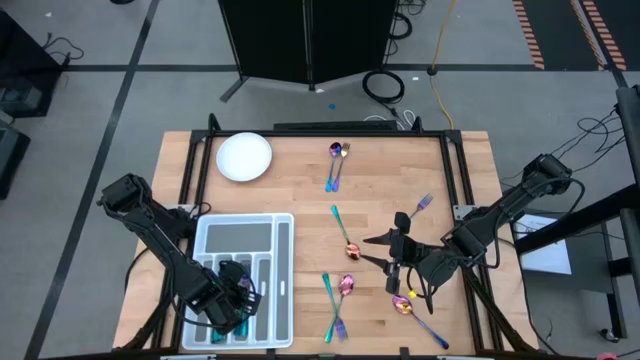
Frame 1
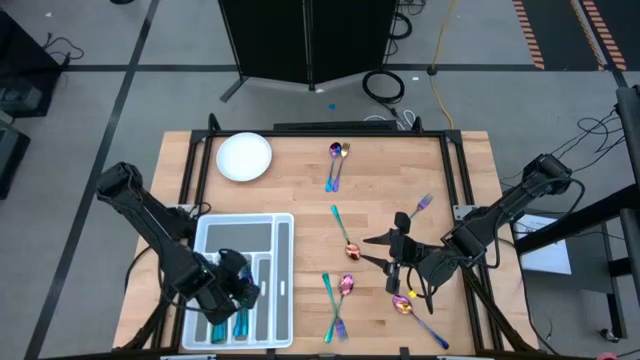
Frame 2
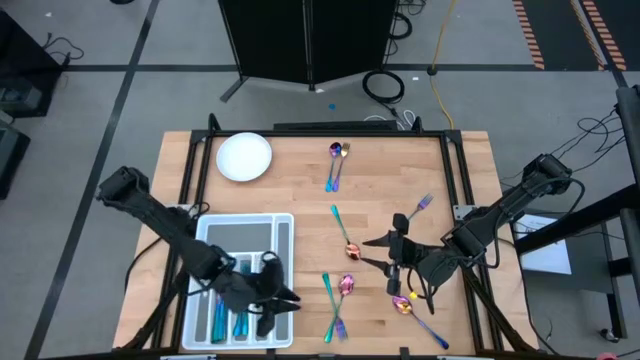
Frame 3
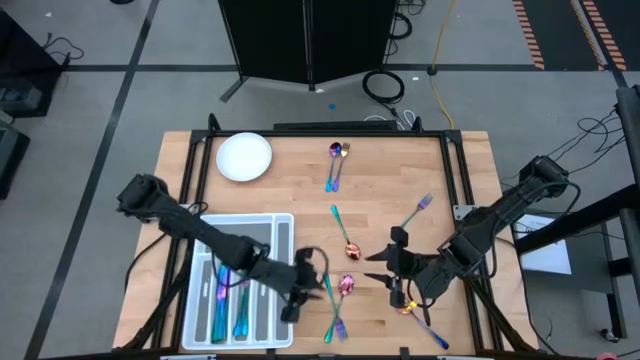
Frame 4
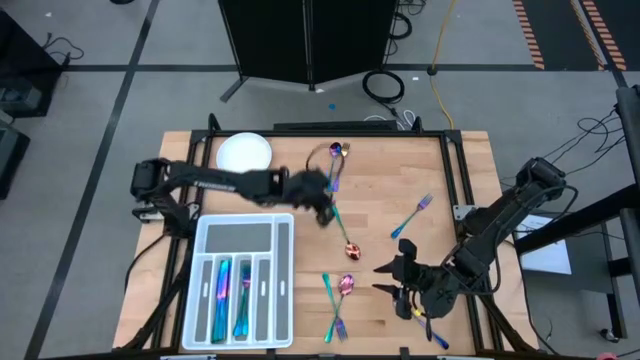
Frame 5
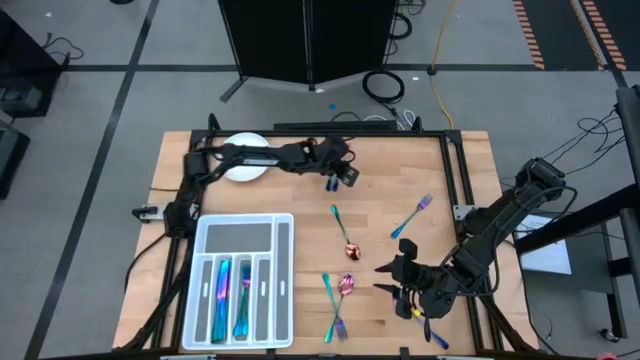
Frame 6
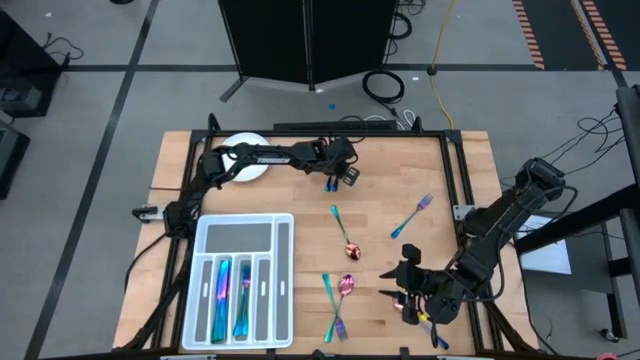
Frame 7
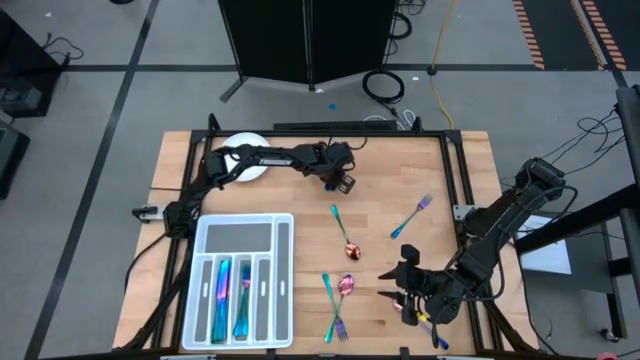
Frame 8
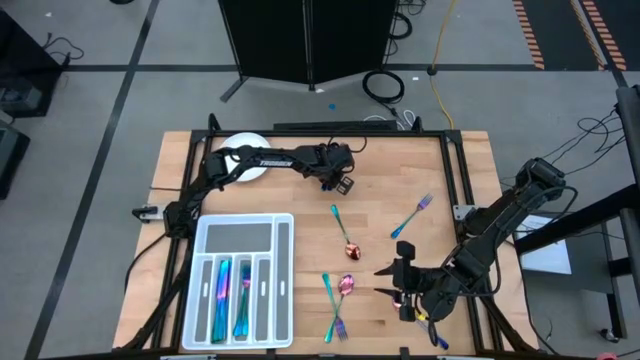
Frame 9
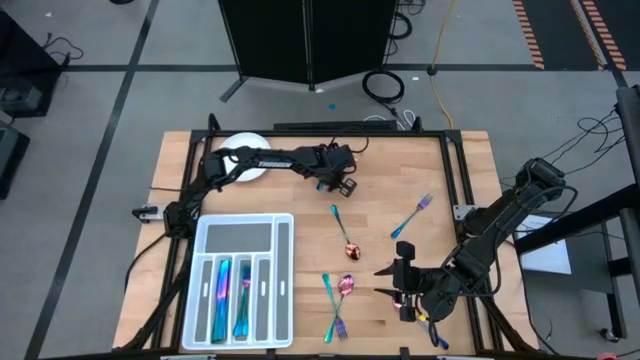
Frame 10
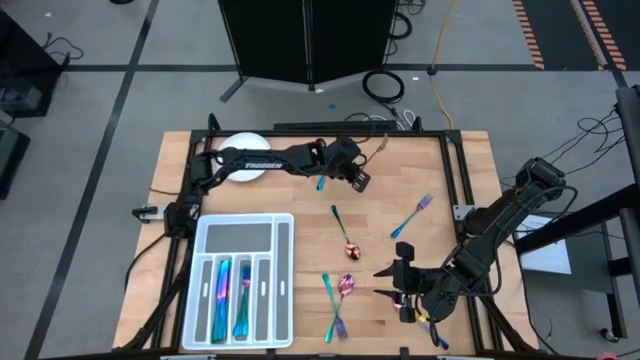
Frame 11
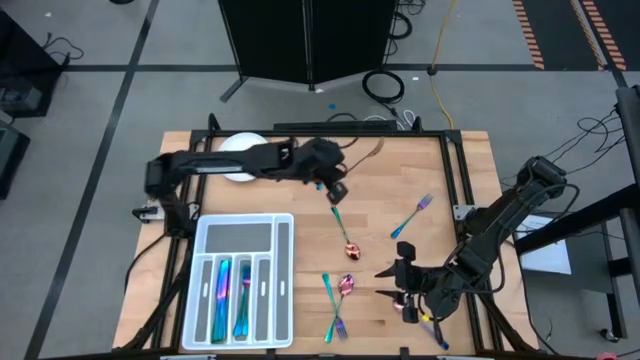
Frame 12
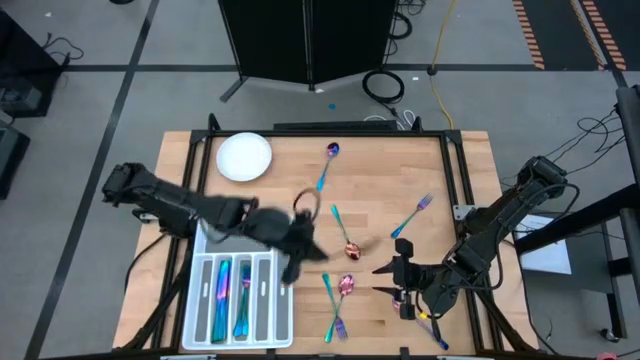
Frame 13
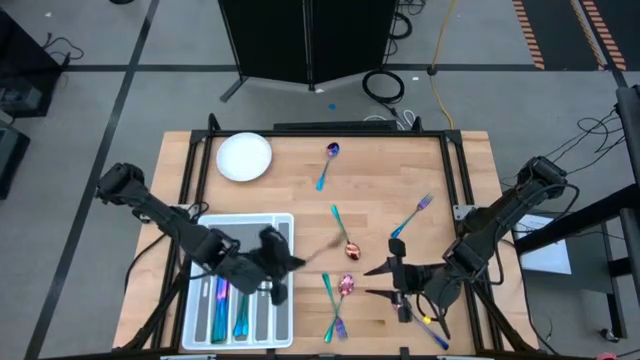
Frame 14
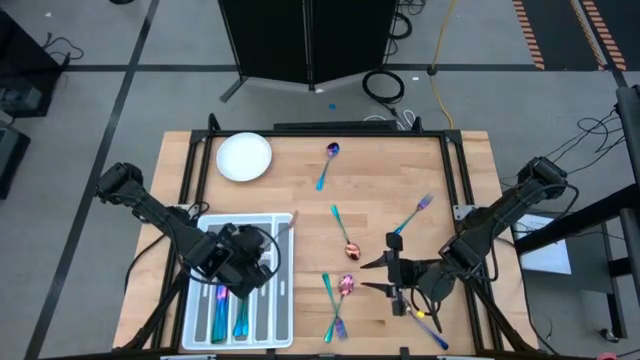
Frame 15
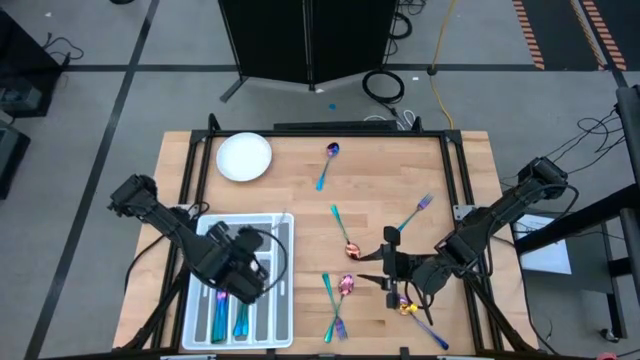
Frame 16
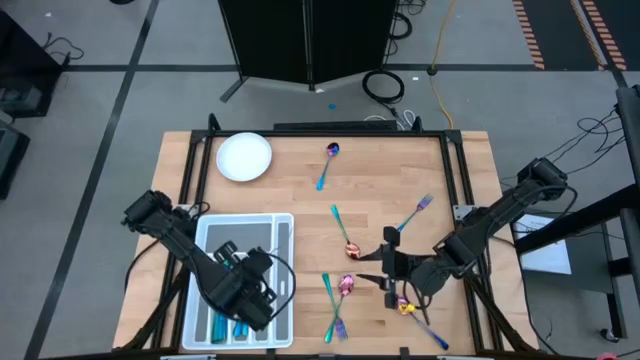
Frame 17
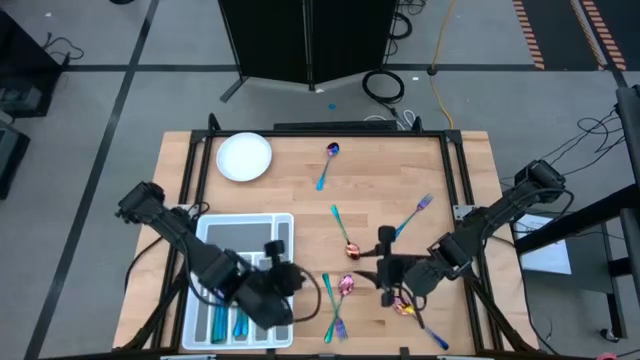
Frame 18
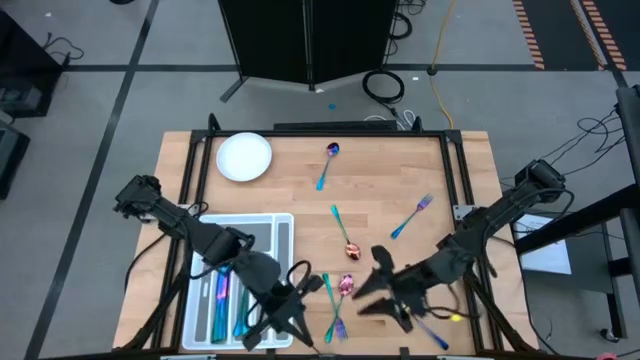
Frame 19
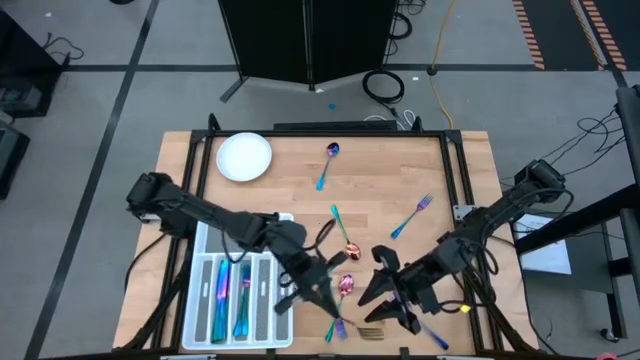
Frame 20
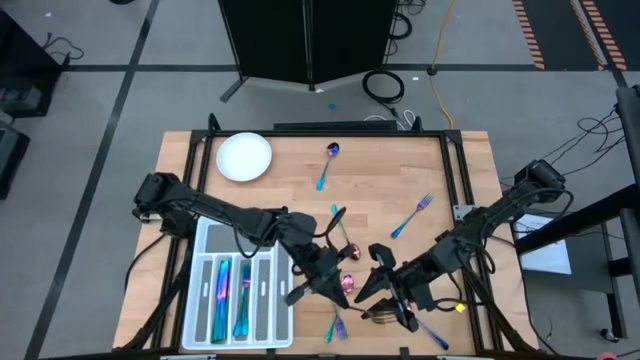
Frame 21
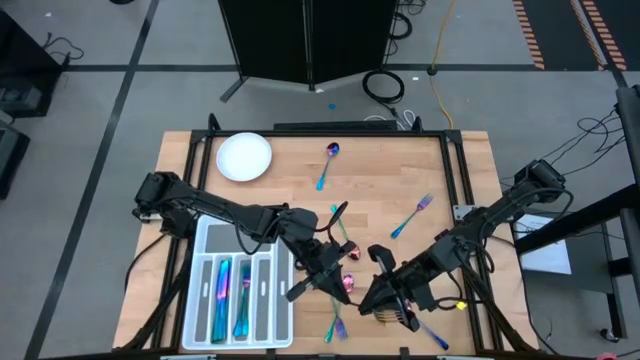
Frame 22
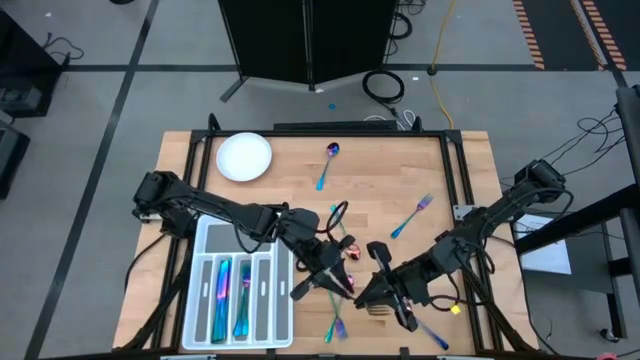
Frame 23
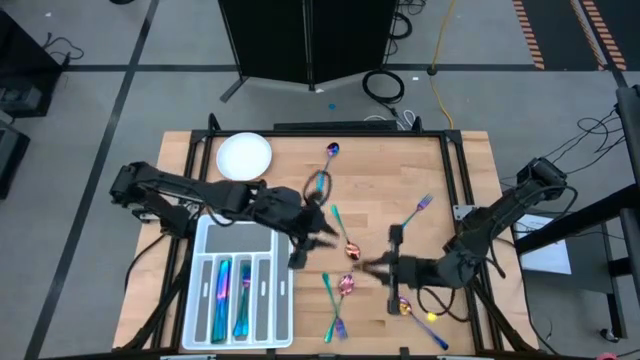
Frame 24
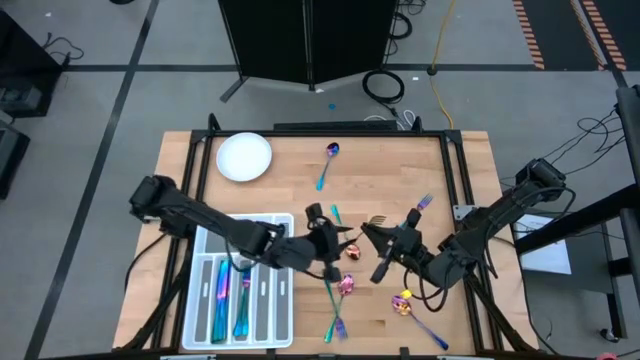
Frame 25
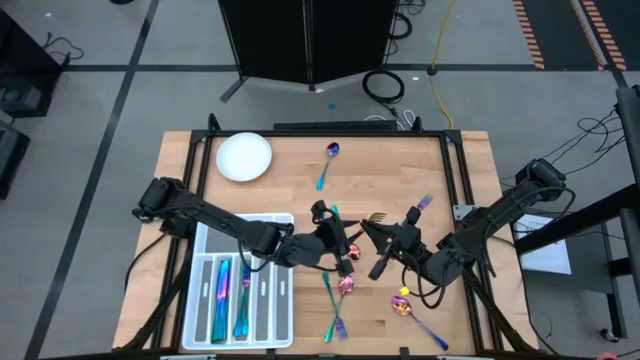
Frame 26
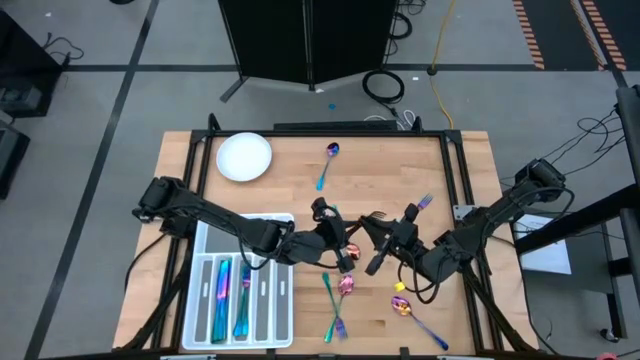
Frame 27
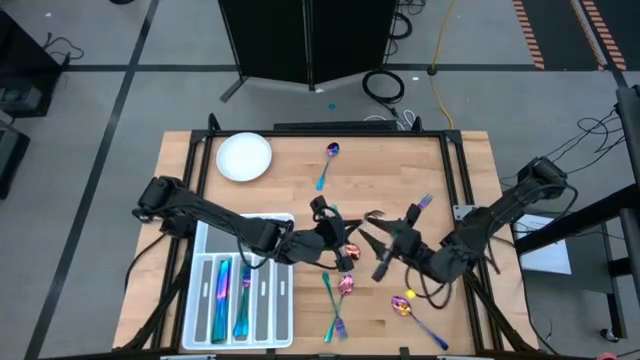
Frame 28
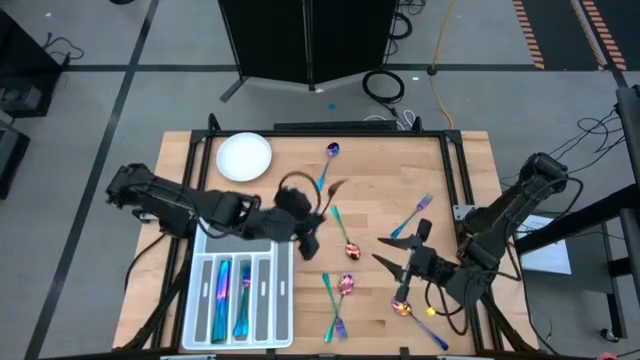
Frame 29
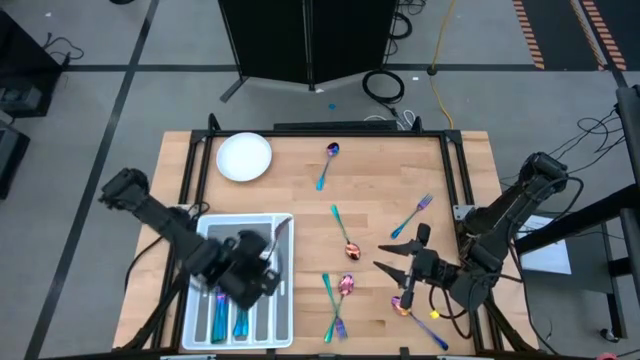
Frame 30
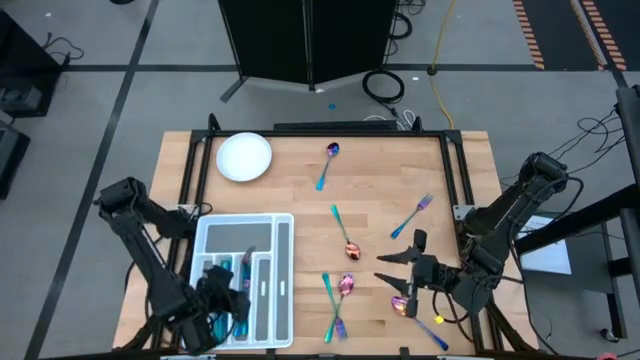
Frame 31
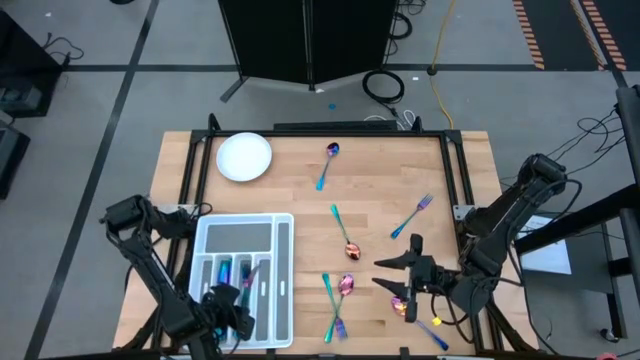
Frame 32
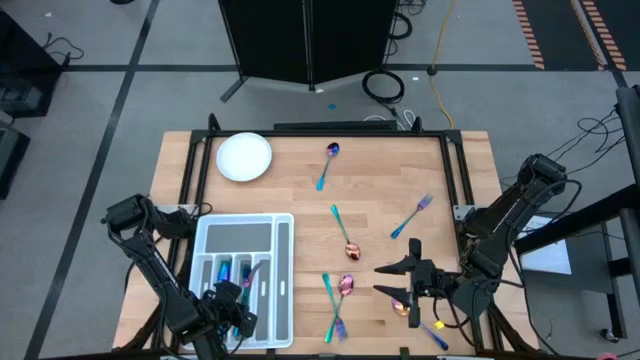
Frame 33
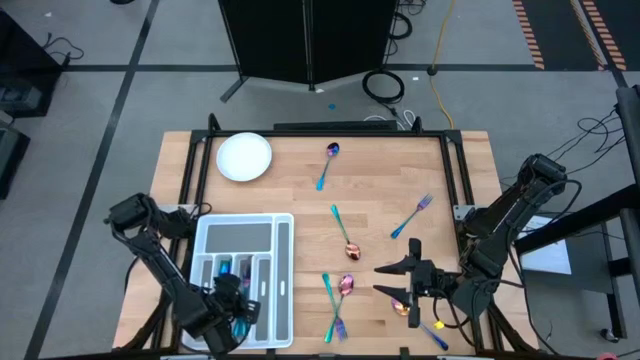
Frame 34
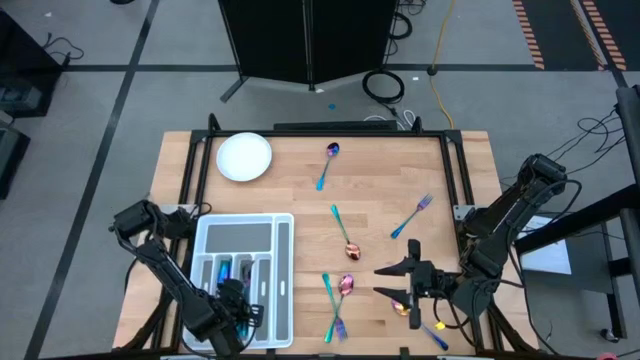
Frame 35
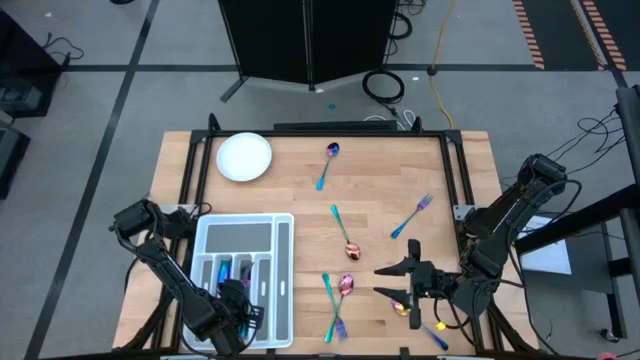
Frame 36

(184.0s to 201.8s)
Task: Sort silverware
Put the iridescent blue fork in the silverware tray

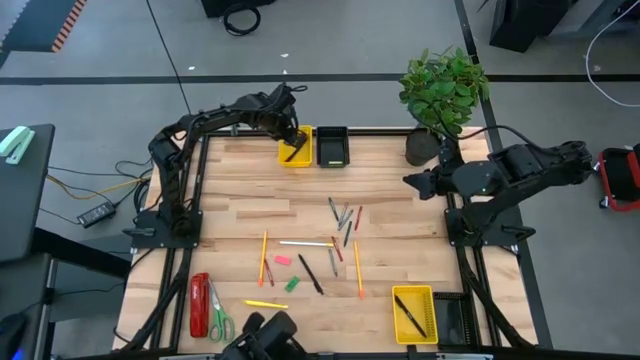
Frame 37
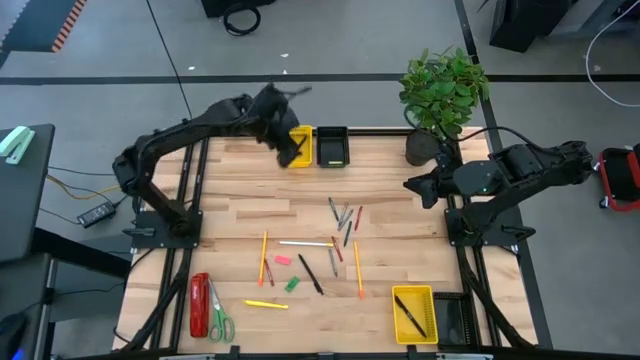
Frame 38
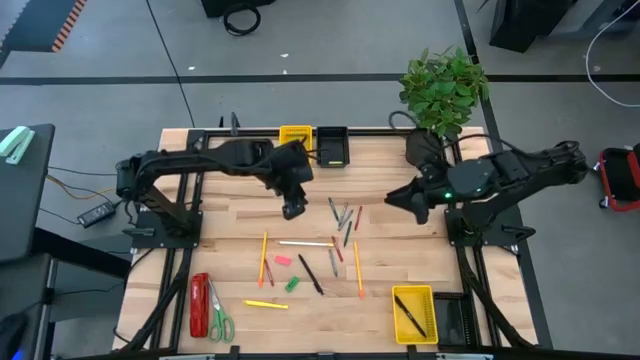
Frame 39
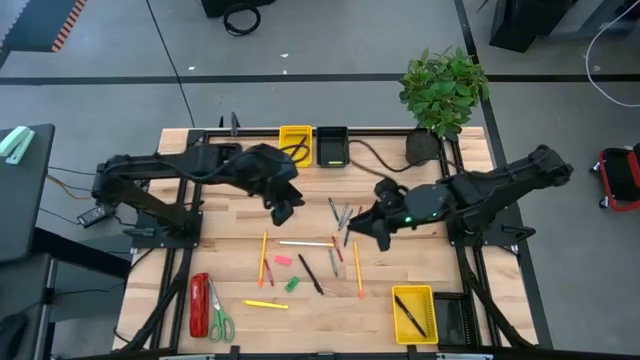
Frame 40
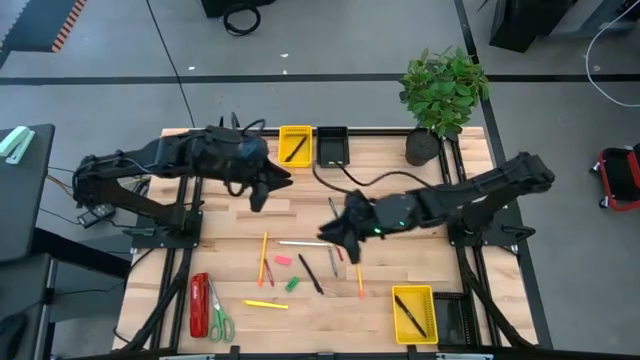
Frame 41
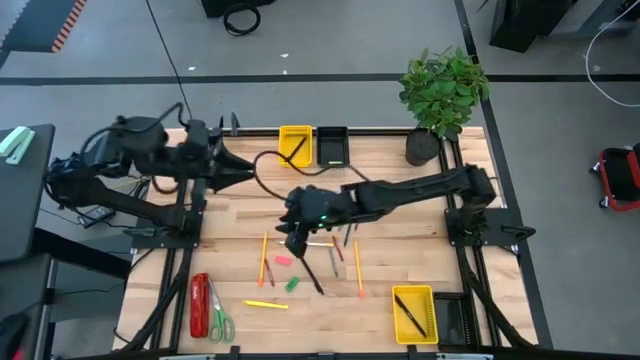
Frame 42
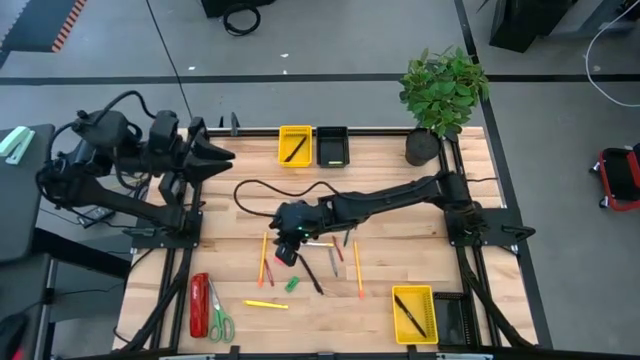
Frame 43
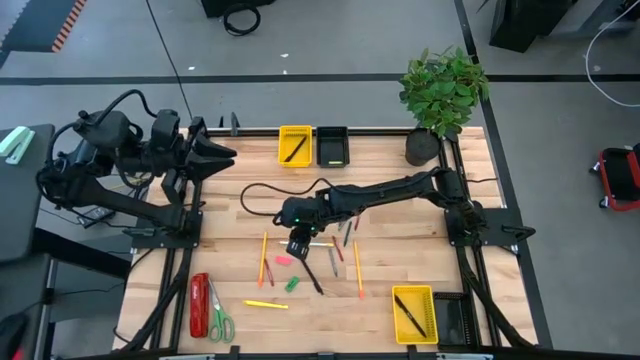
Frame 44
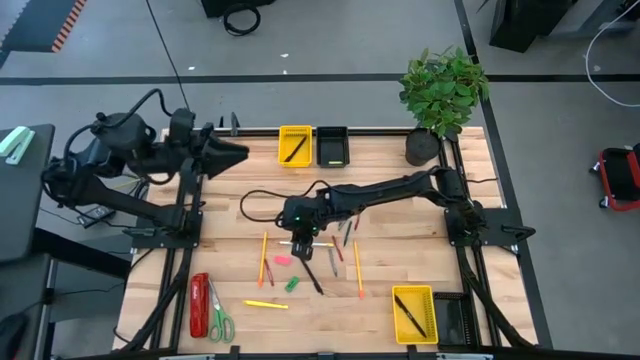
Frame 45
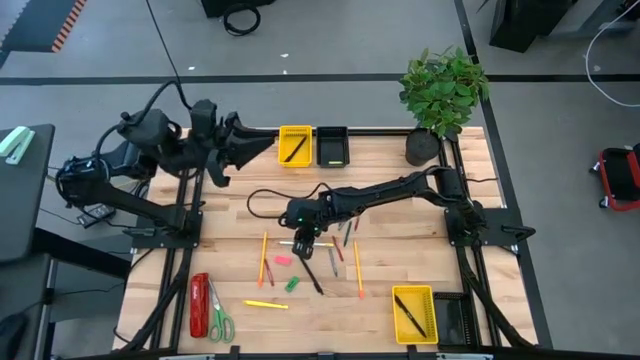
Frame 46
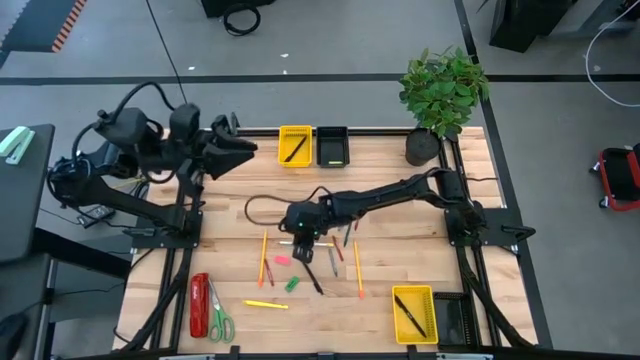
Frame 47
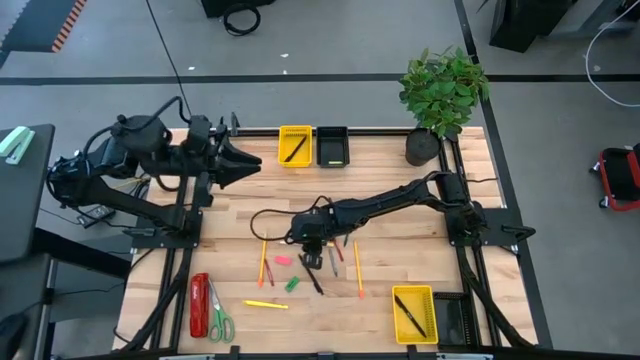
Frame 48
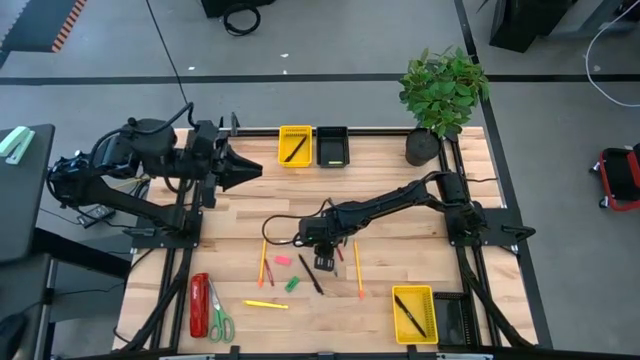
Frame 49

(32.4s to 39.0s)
Task: Sort crayons/erasers/pens/pencils in bins
Put the white pencil into the bottom black bin
